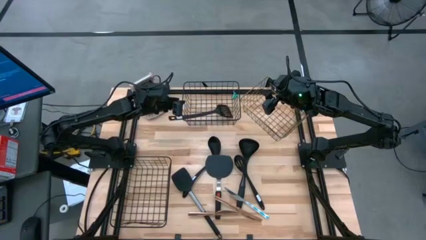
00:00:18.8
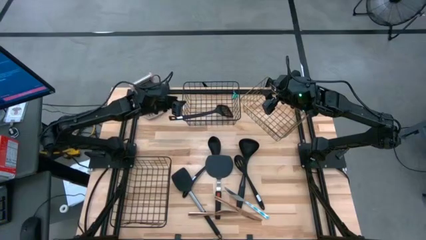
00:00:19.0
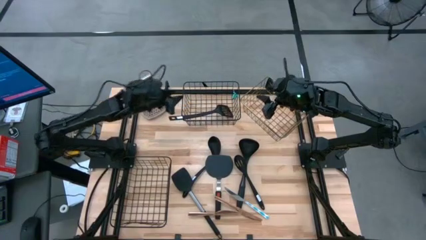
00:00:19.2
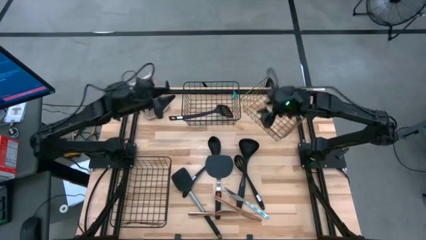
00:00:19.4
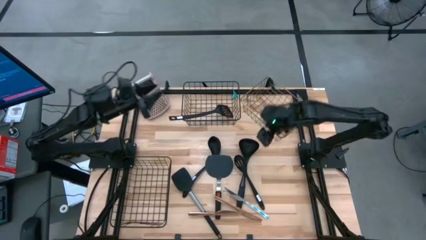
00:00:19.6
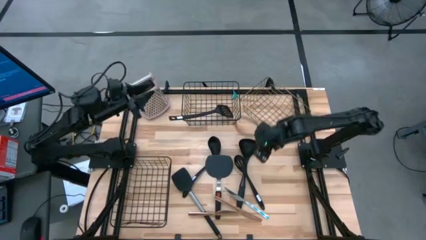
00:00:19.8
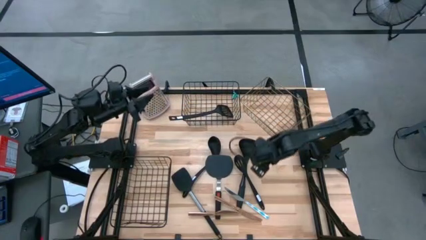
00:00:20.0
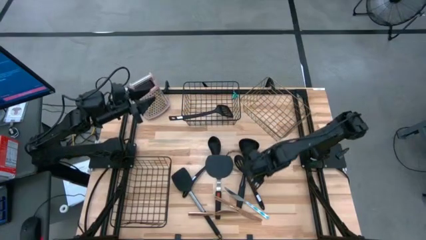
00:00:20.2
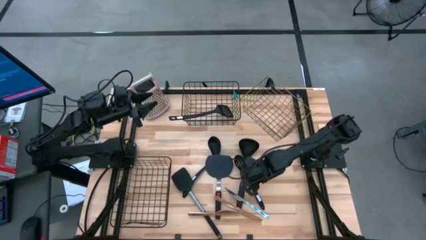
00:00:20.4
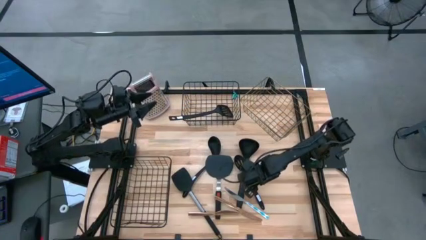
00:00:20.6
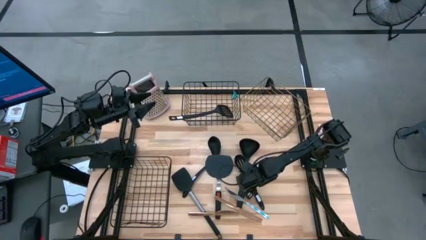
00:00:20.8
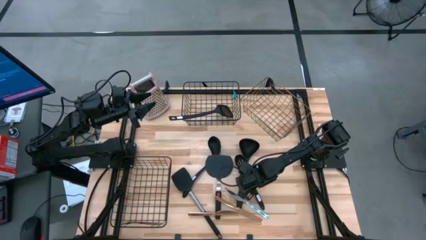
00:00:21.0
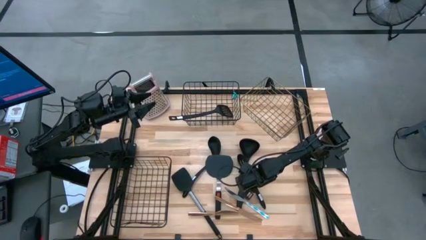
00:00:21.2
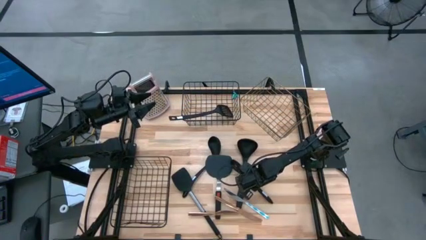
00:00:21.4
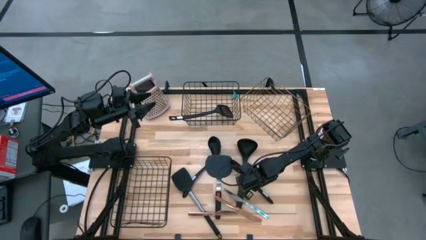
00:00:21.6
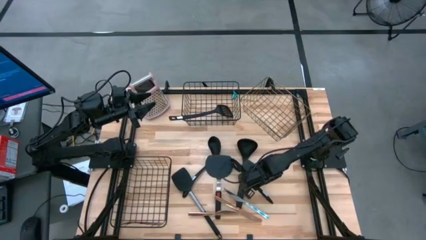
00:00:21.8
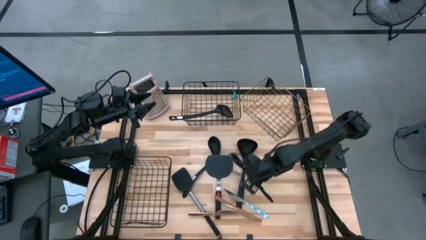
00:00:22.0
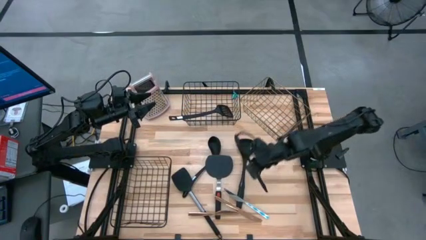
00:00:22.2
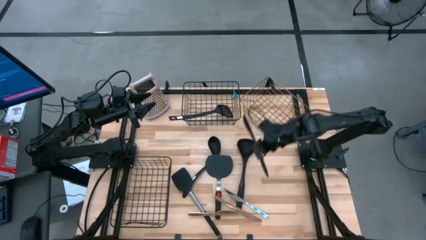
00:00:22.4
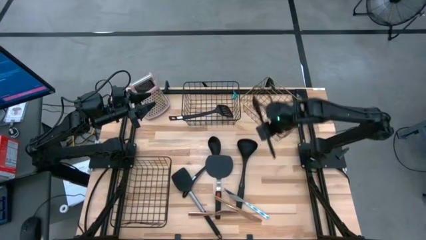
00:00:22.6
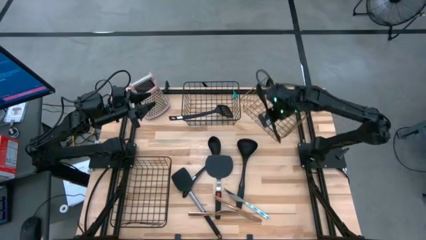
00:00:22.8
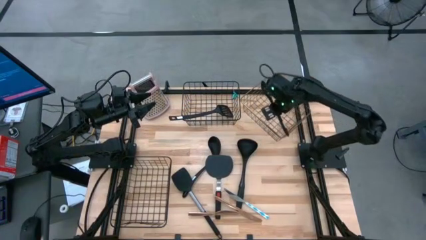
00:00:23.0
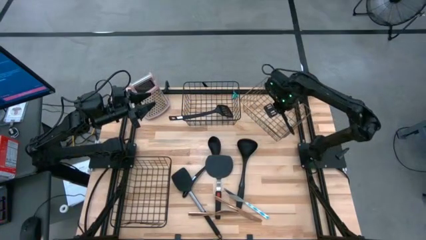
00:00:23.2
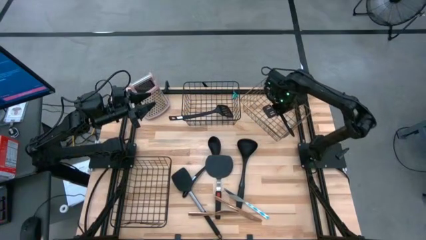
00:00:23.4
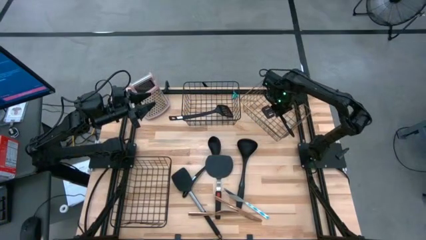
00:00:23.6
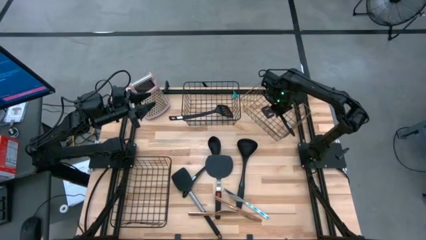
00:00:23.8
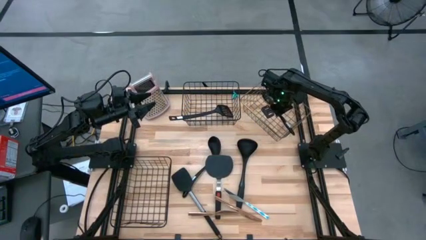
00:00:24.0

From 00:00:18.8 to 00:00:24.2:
Task: Pick & Place Kitchen Items
Put the black slotted serving spoon into the top right wire basket

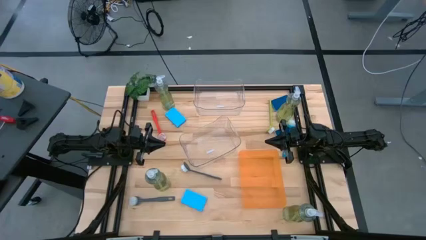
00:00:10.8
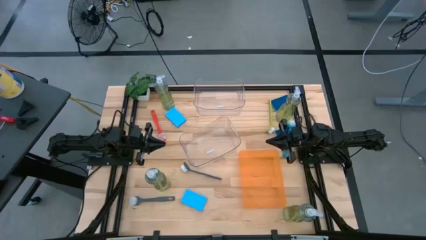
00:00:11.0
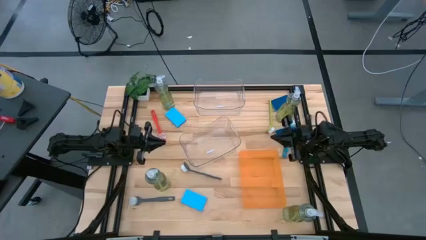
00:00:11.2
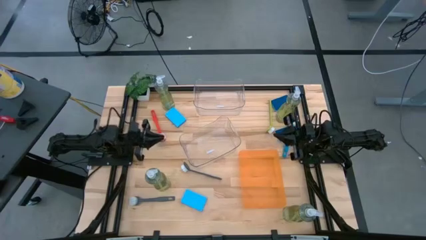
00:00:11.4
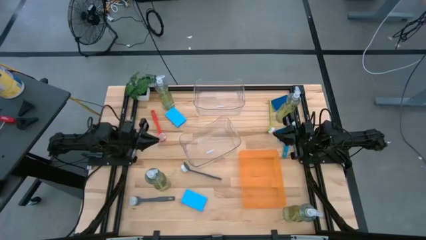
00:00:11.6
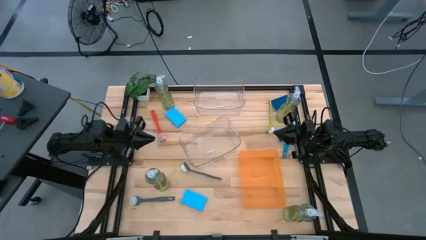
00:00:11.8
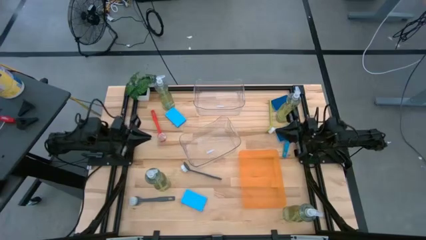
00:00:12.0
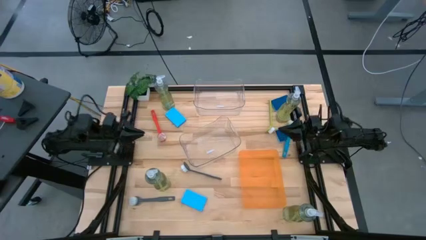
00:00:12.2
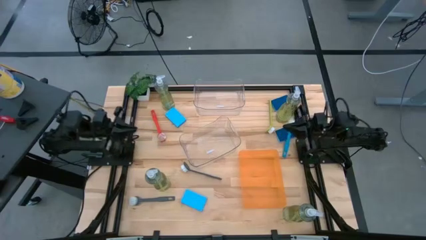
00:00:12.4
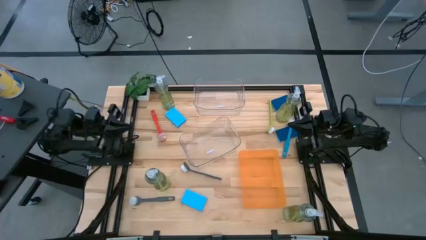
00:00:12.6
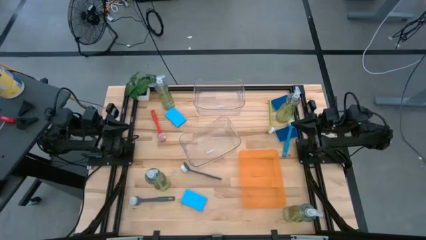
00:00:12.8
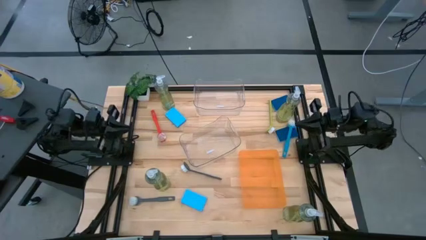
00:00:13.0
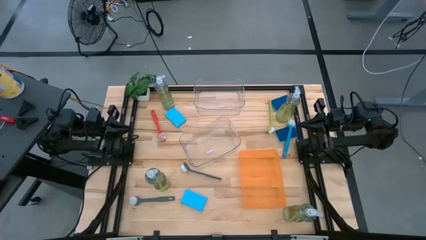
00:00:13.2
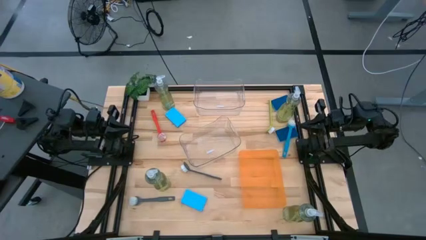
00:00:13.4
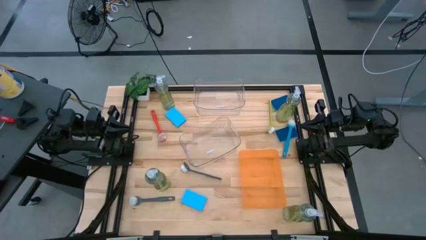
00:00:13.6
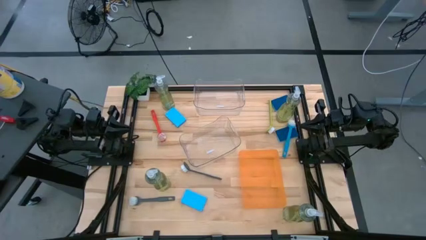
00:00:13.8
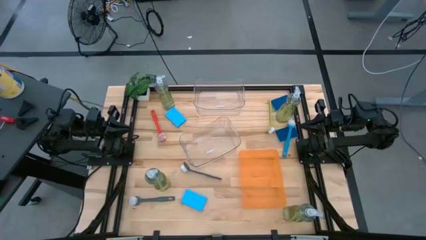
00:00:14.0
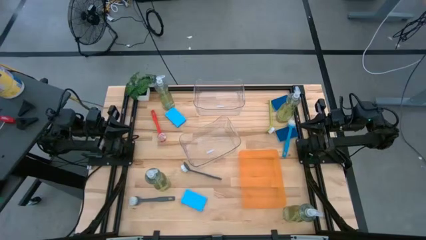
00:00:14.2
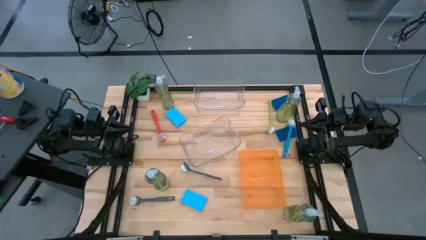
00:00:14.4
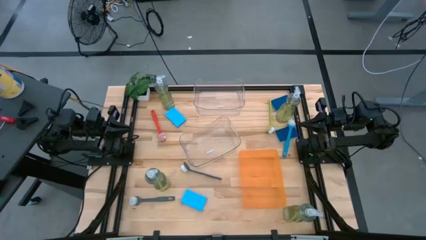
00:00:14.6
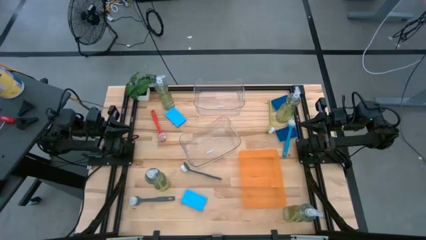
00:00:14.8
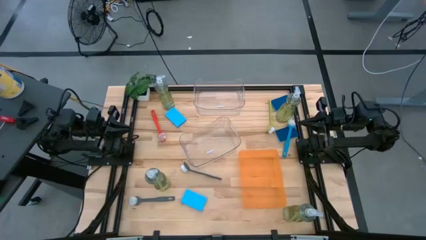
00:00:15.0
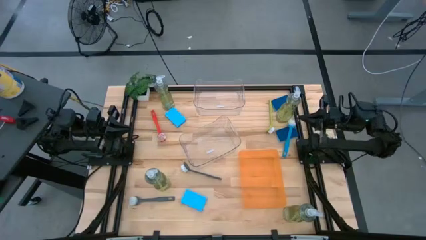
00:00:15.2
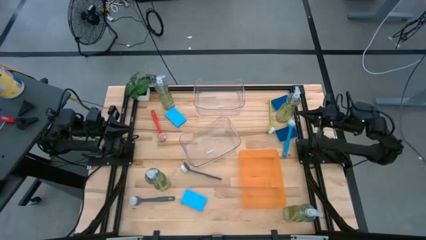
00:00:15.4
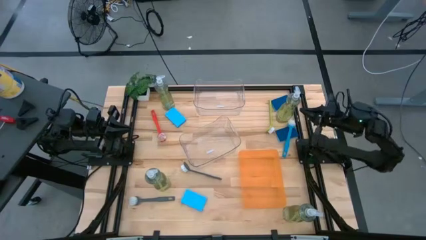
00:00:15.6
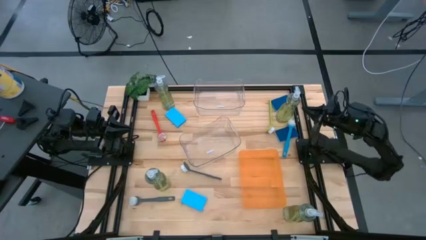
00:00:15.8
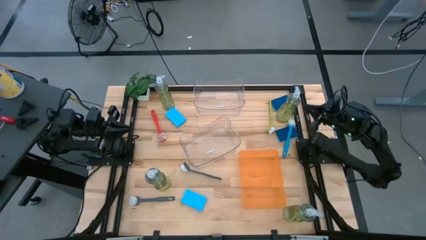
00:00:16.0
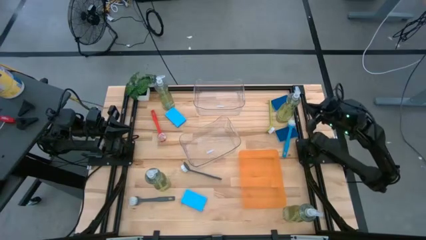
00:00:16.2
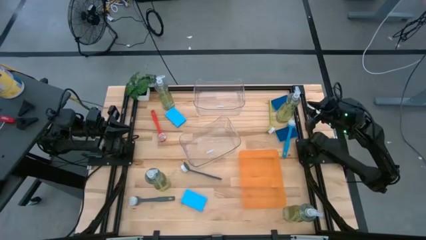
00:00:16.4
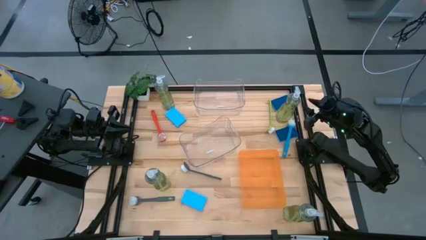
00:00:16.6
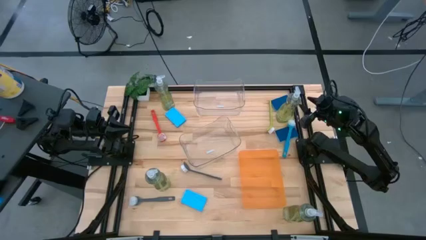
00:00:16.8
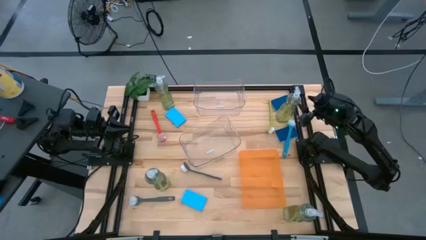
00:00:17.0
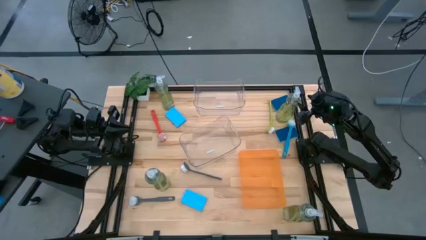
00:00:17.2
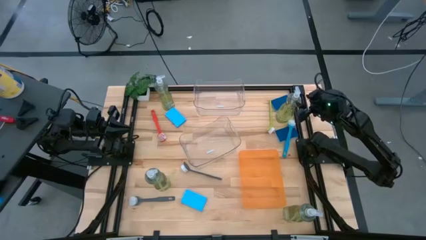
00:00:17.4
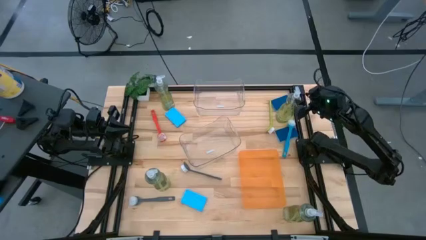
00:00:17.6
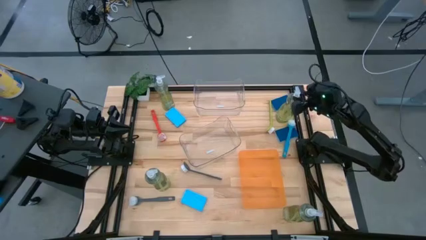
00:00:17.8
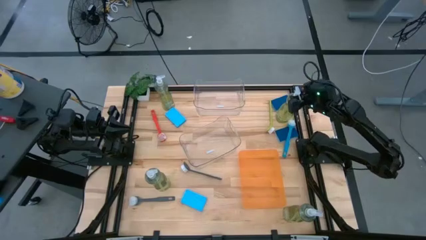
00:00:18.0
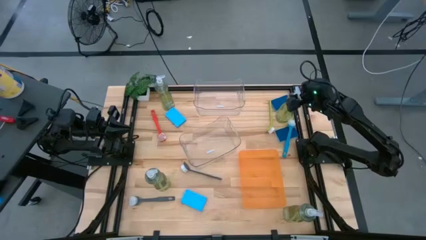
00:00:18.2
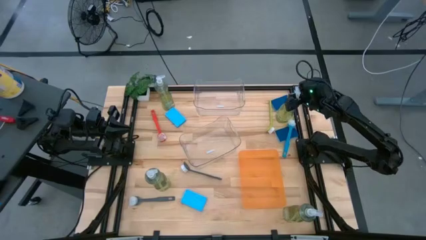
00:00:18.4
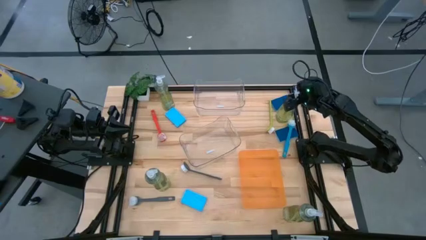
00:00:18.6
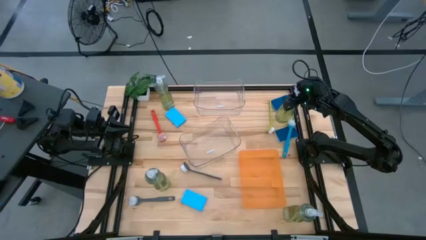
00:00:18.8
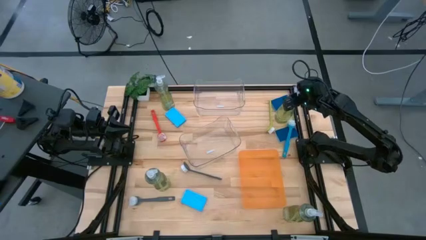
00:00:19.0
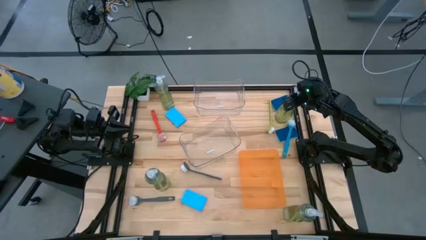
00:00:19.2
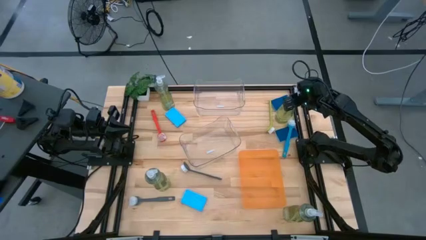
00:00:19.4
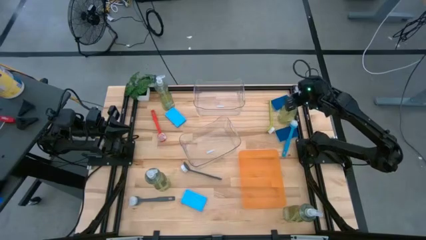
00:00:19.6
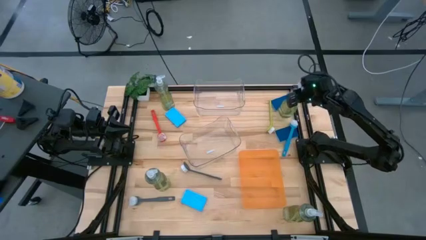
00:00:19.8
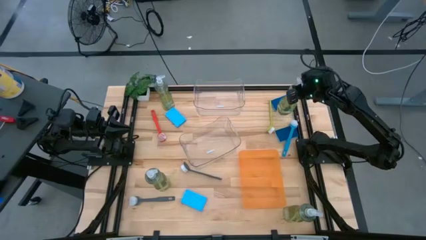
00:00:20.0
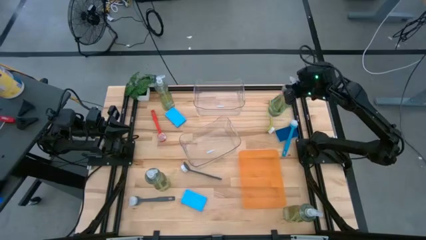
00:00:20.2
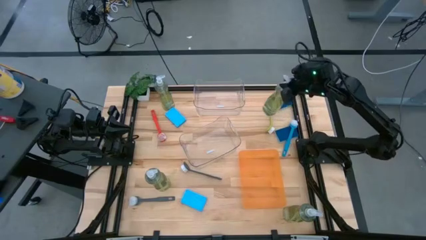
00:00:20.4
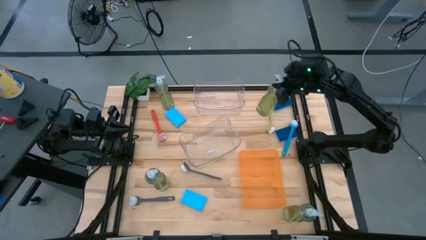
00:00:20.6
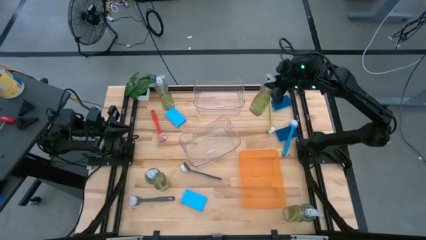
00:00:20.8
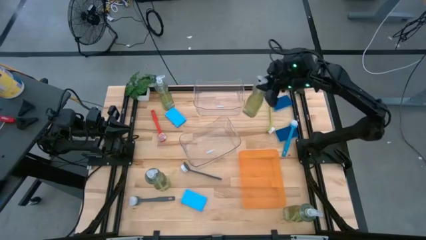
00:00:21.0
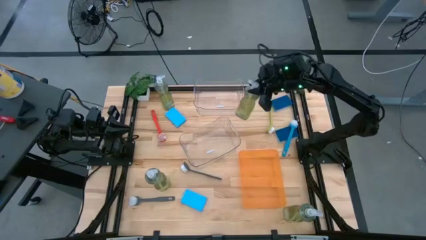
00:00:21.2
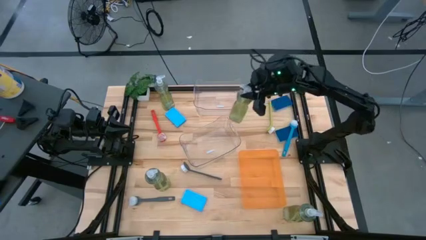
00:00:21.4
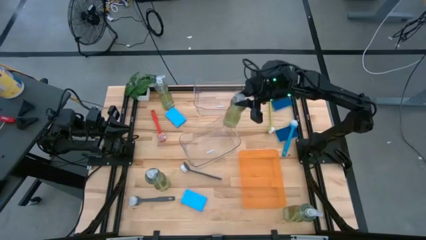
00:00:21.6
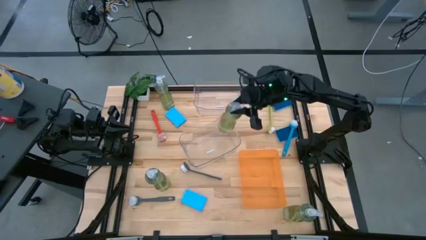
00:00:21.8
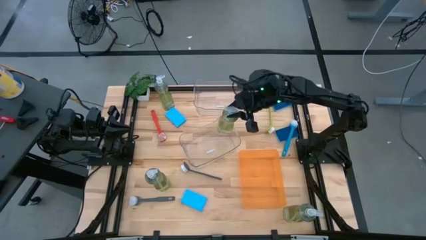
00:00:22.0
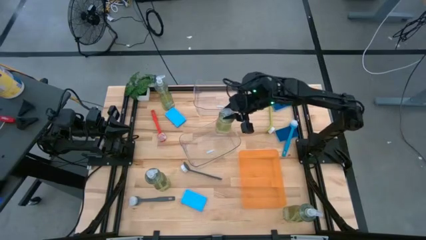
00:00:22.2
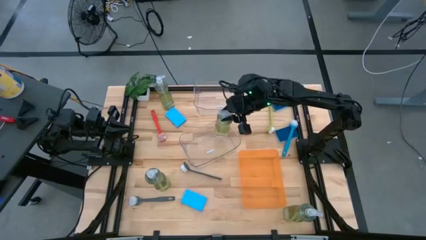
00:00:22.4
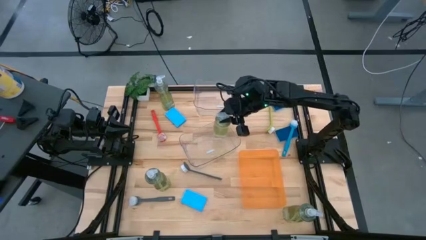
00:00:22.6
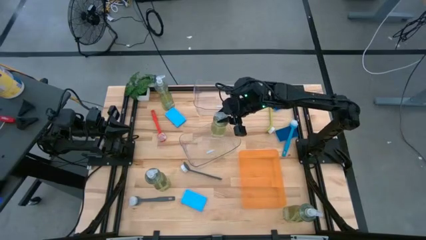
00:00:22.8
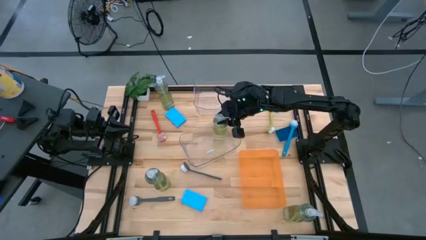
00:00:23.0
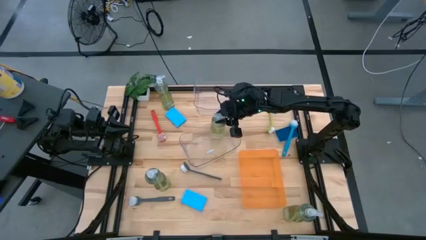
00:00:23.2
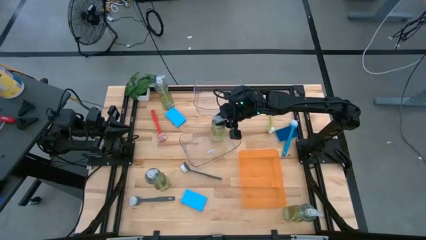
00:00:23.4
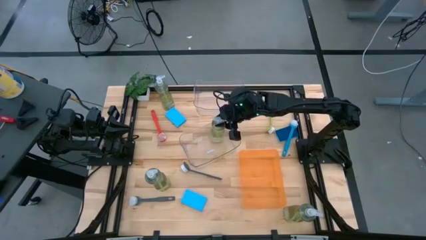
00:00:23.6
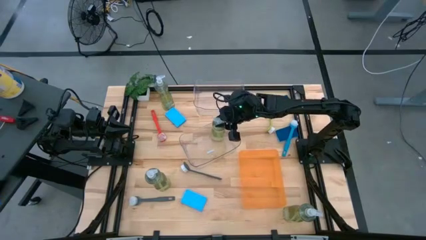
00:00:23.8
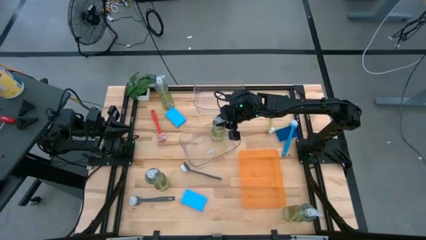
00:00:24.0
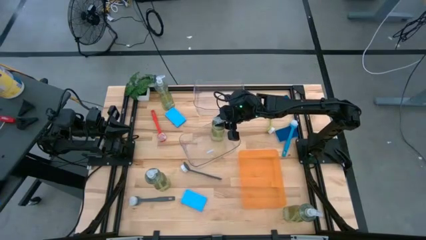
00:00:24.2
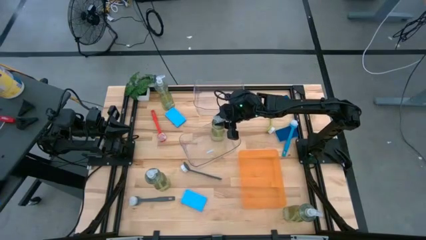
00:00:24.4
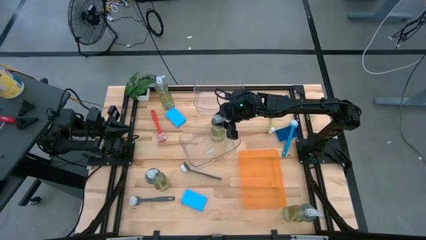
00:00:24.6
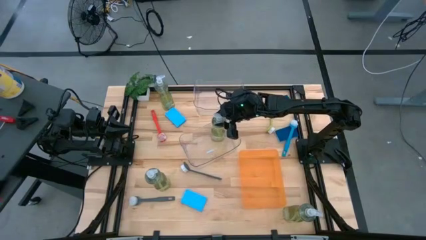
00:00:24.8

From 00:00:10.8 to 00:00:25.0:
Task: Pick & Place Kitchen Sink Supplies
Put the green dish soap into the bottom transparent bin
